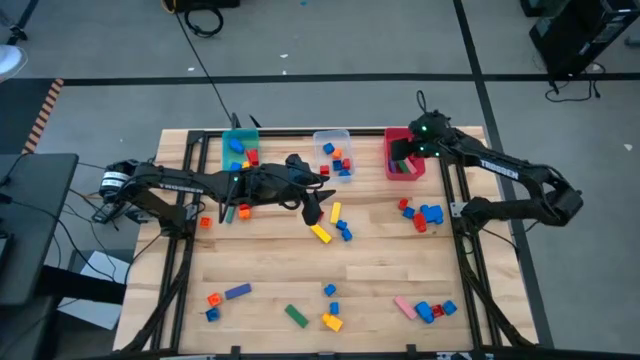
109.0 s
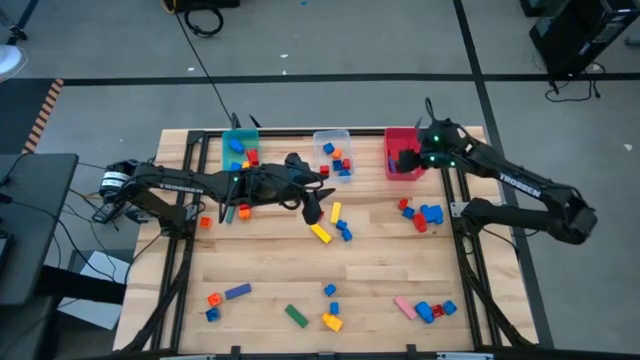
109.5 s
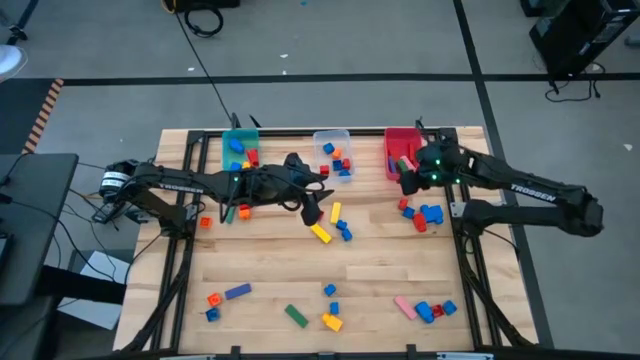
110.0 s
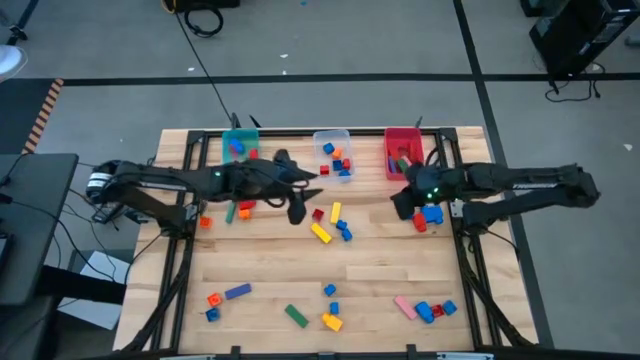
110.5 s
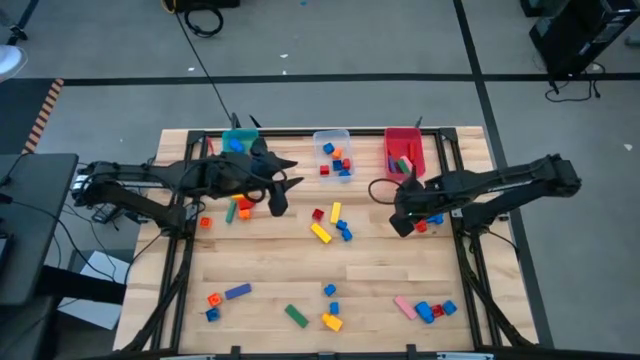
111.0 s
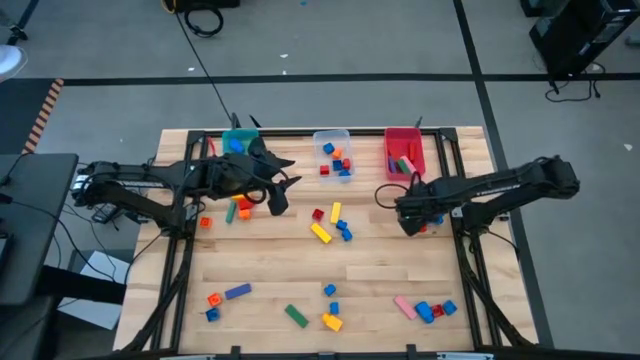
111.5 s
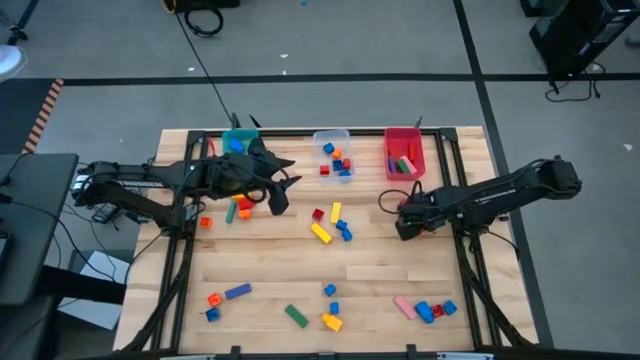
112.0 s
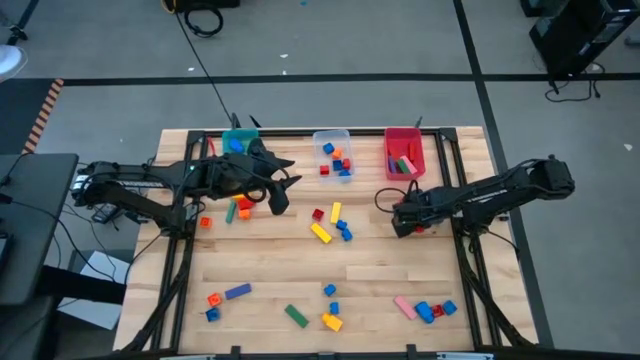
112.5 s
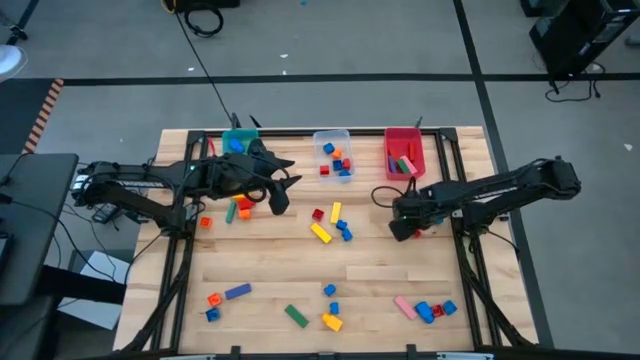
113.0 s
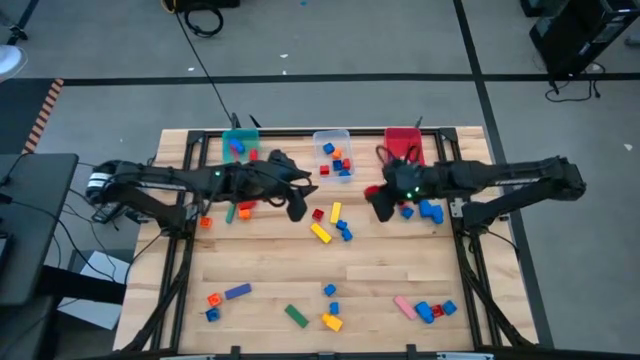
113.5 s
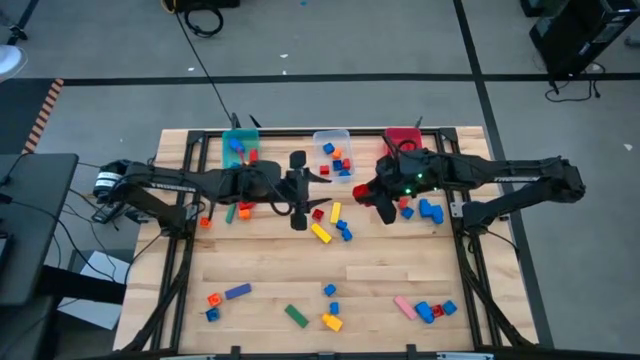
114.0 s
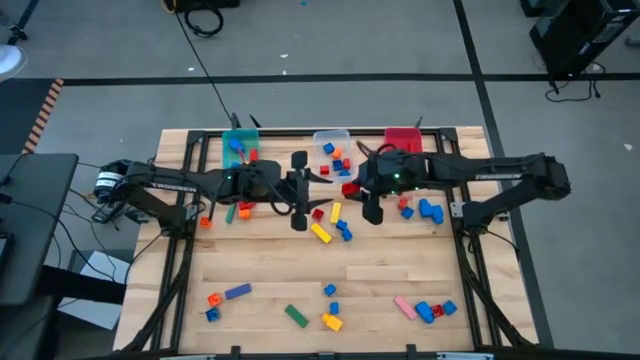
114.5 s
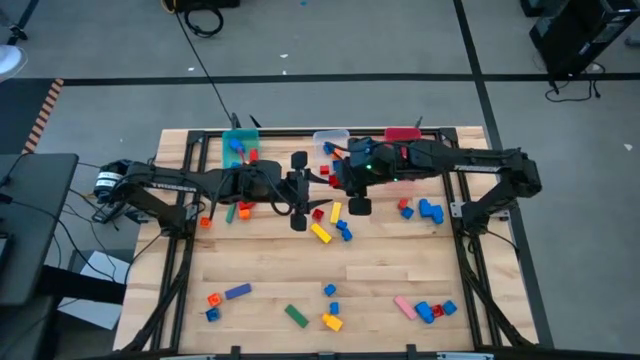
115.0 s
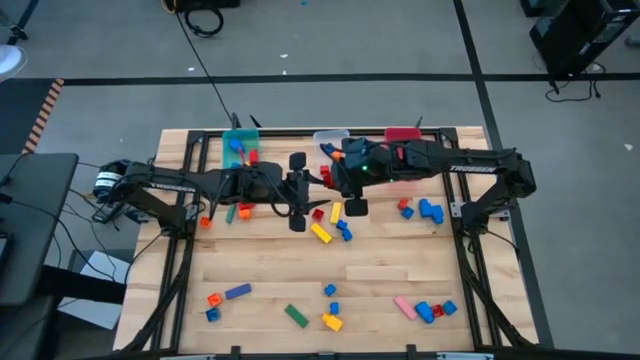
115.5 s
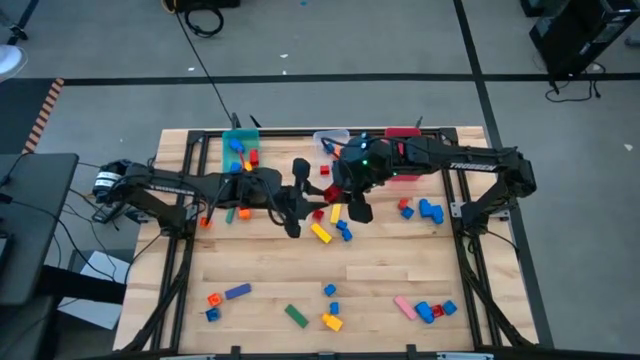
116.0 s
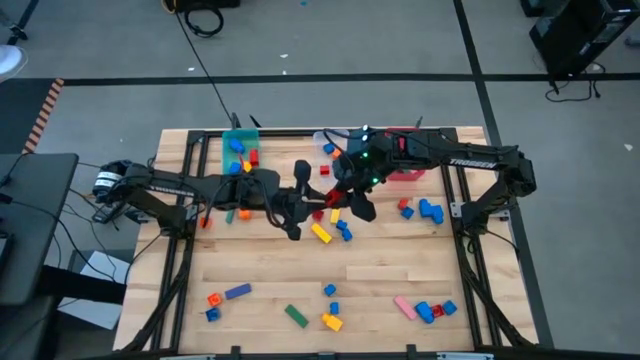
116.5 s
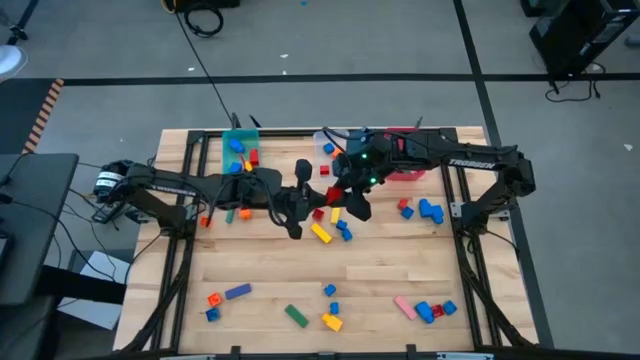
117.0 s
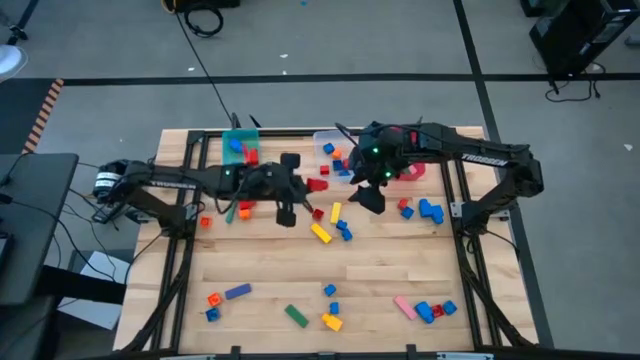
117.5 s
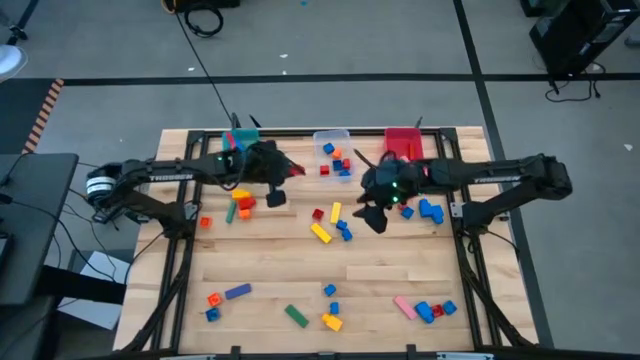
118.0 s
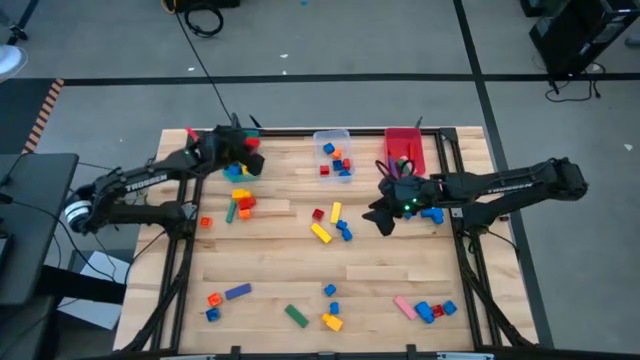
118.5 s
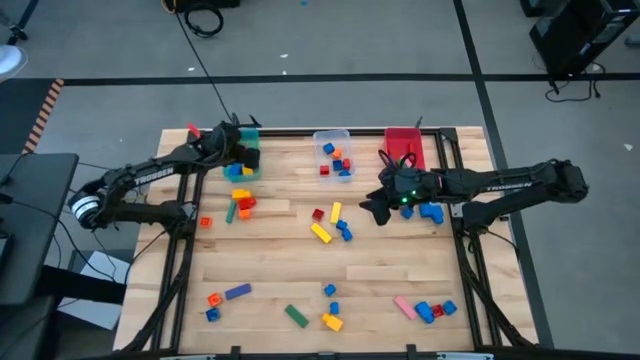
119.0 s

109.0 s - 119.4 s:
Task: Sort blocks by size
Put the red 1 stud game piece into the blue bin

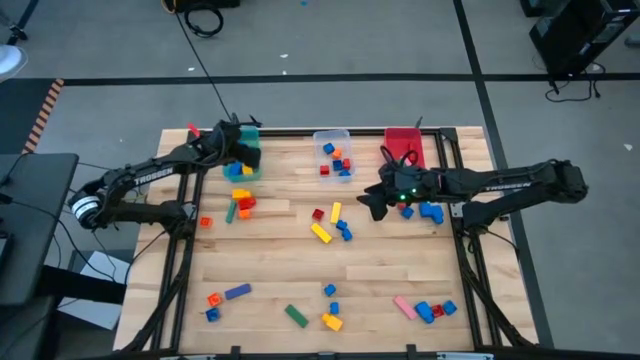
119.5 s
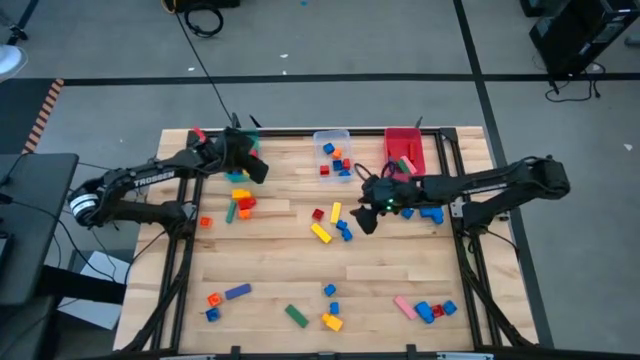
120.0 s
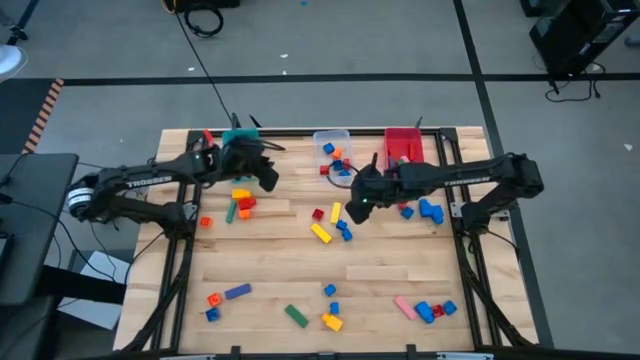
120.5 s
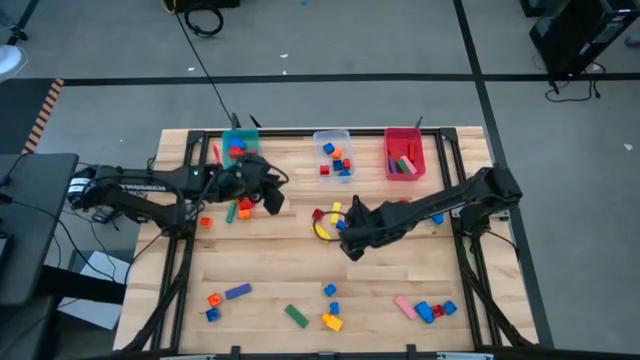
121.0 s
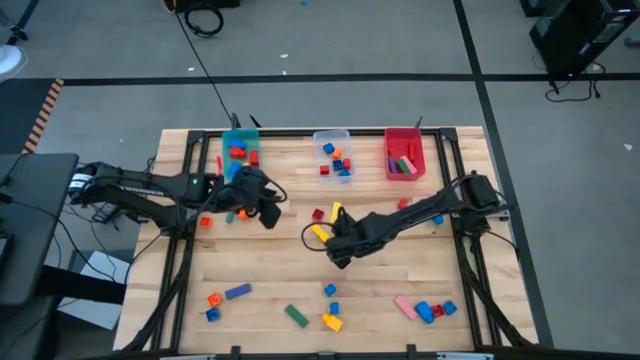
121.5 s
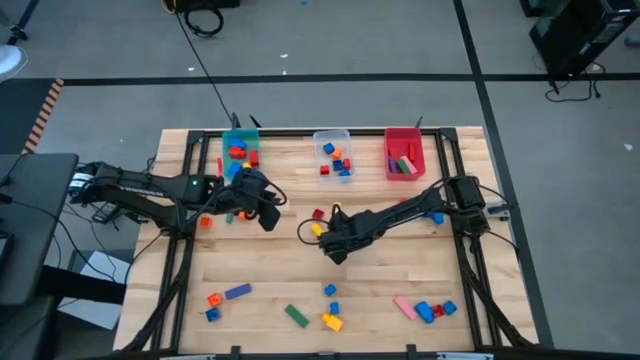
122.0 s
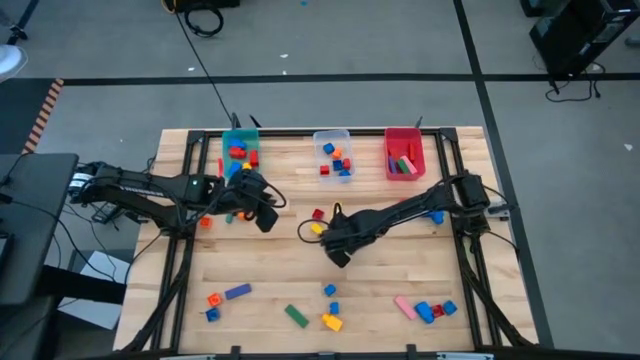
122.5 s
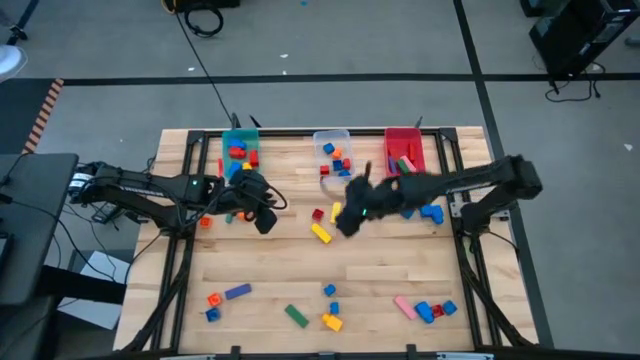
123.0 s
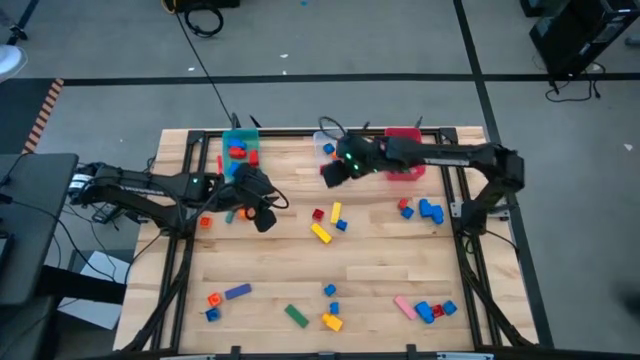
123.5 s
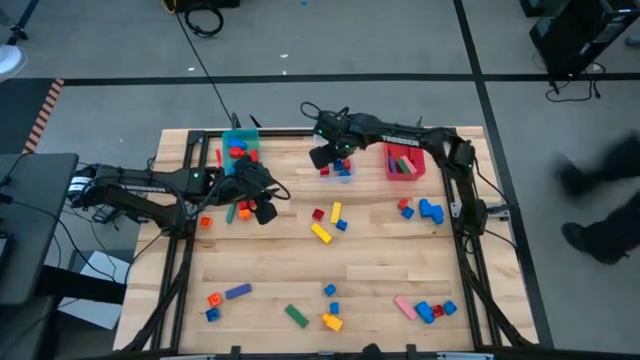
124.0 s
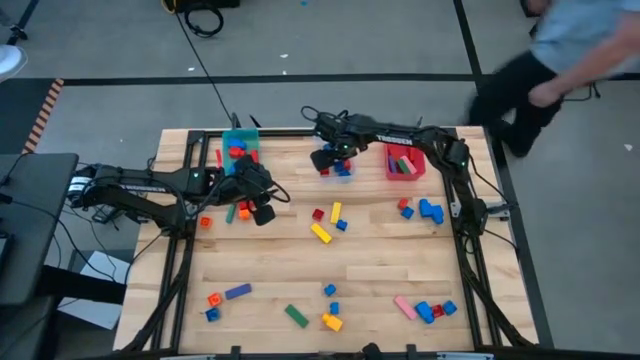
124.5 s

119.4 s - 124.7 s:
Put the blue 4 stud game piece into the transparent bin

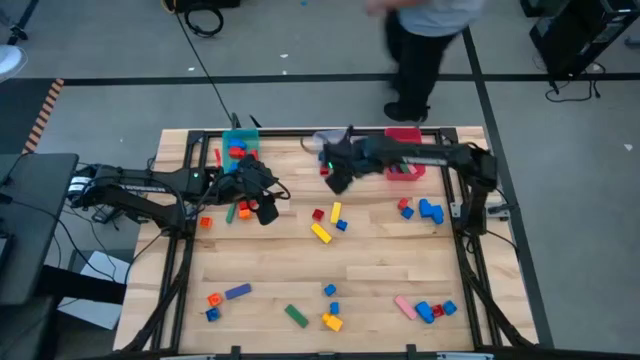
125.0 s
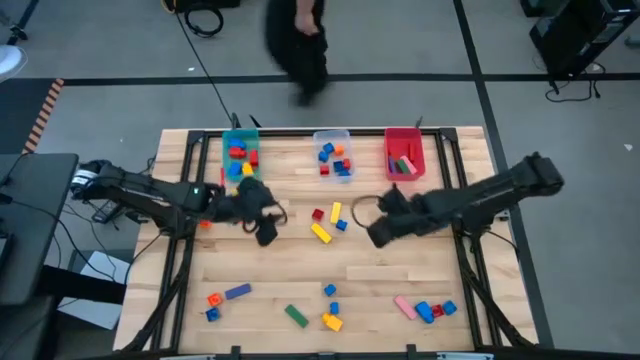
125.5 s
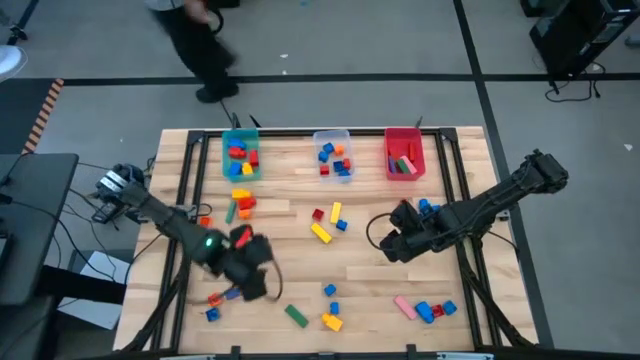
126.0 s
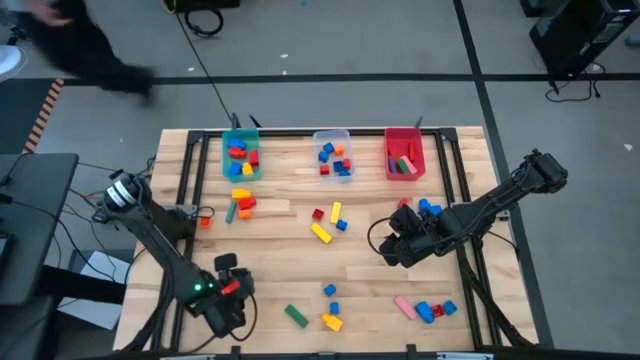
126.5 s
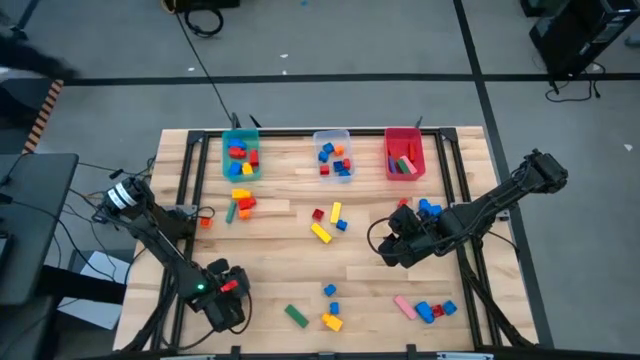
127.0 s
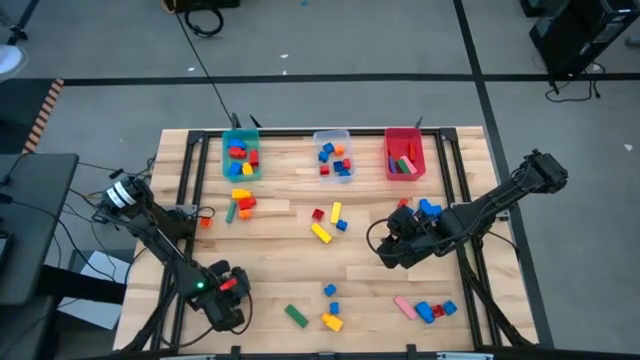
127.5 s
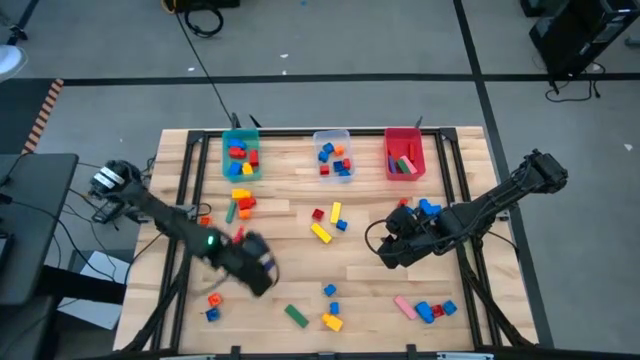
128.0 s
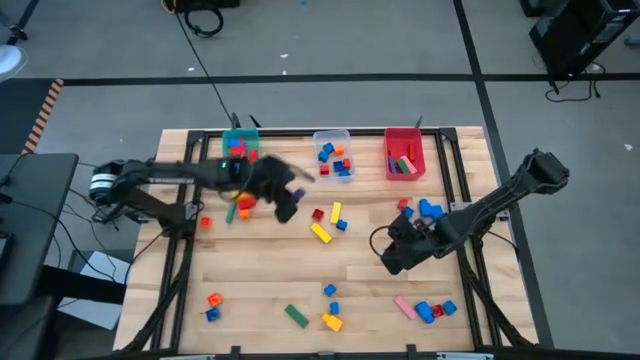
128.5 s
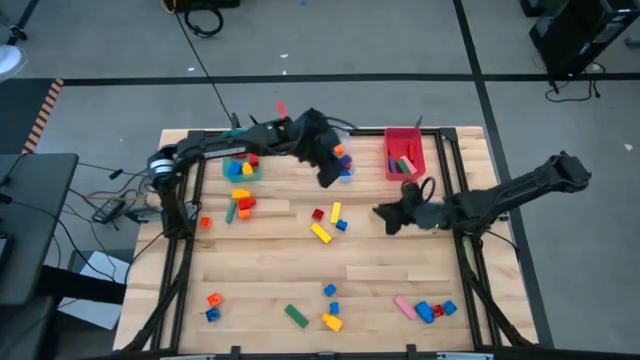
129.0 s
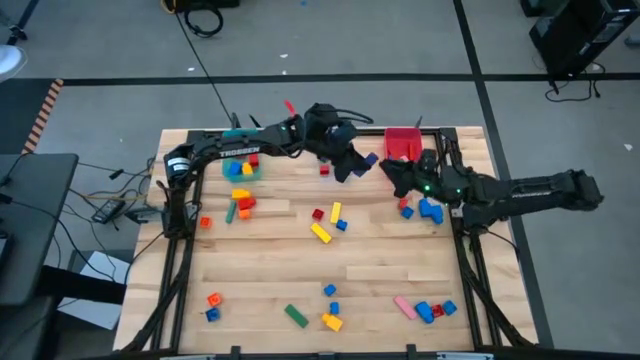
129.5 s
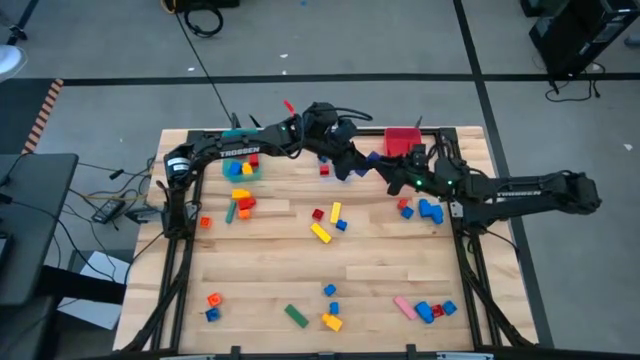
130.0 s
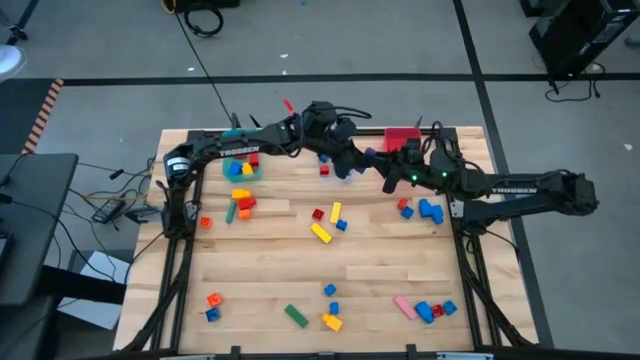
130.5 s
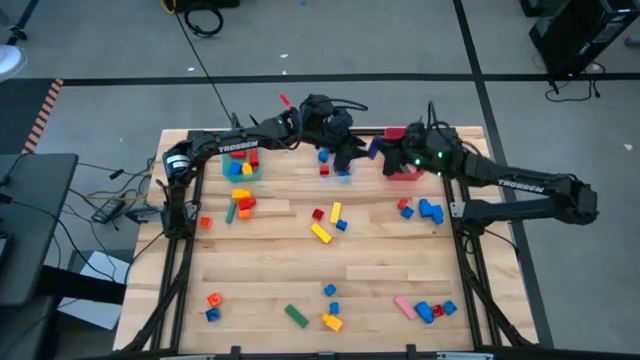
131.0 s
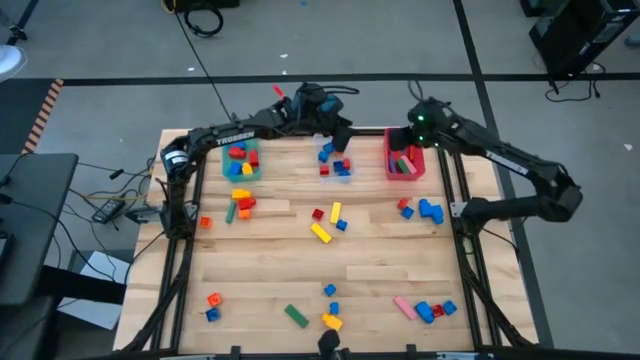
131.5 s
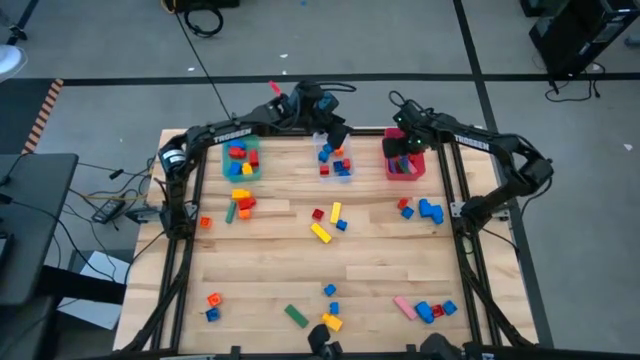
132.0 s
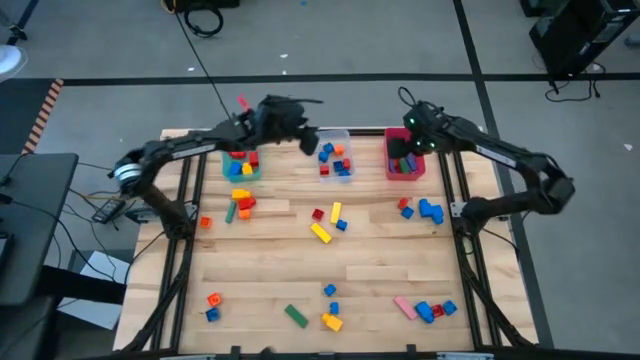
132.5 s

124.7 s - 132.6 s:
Put the blue block into the red bin
